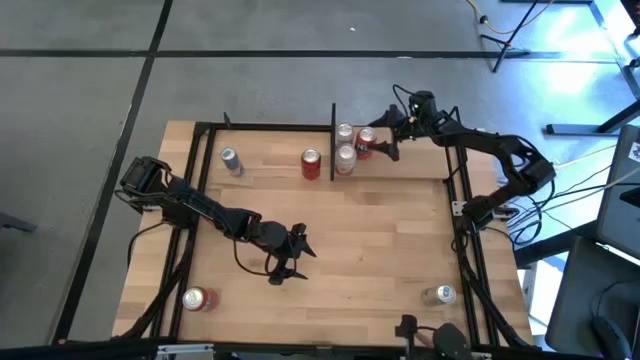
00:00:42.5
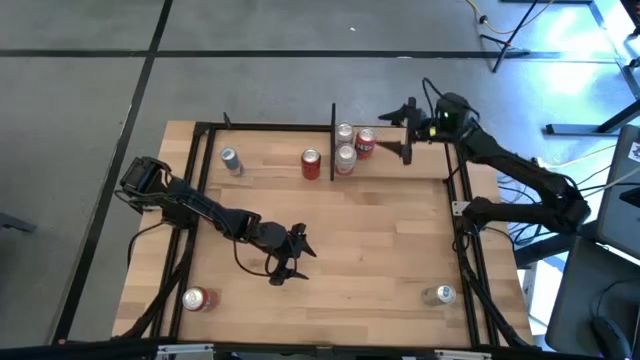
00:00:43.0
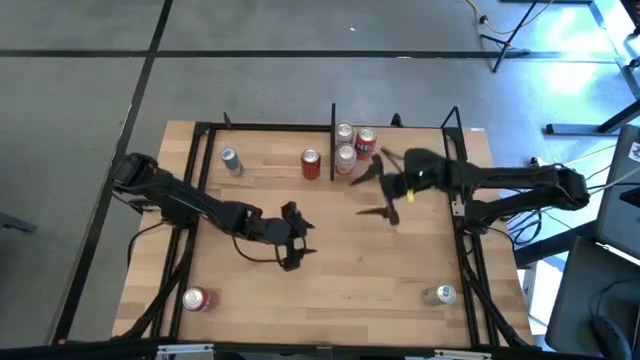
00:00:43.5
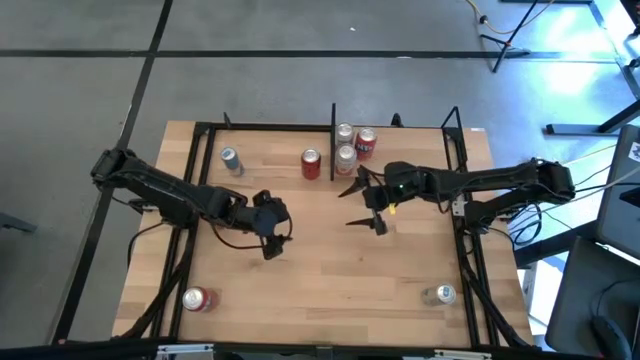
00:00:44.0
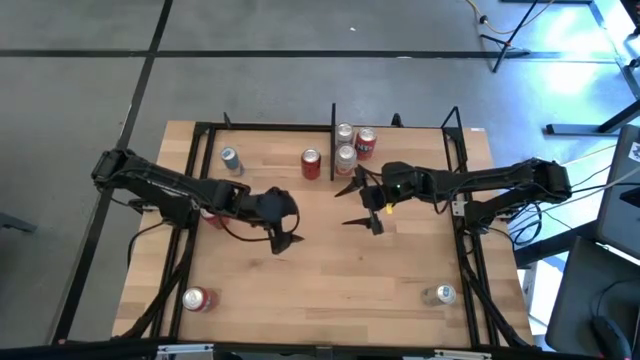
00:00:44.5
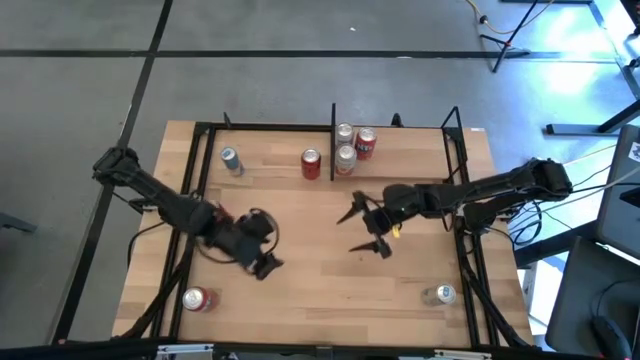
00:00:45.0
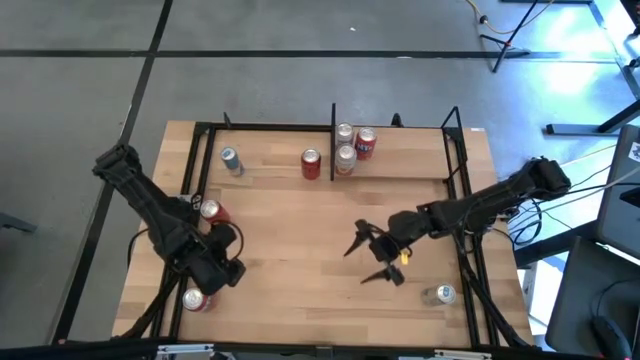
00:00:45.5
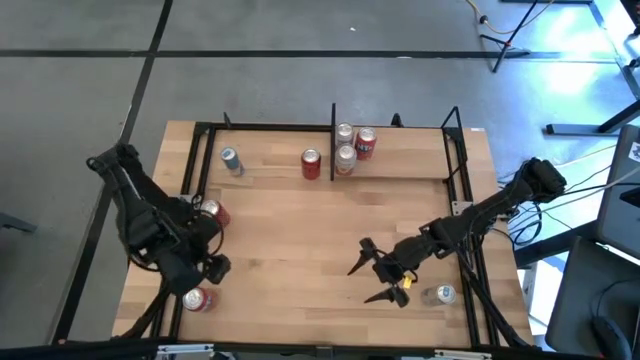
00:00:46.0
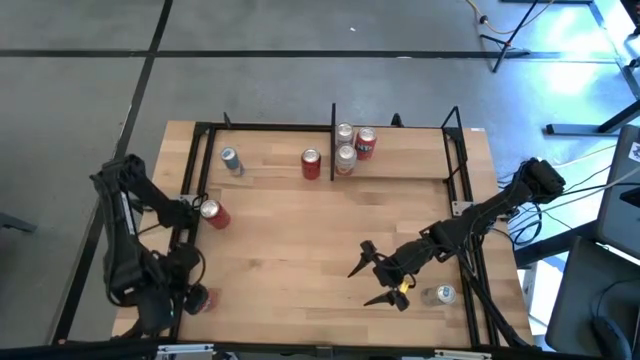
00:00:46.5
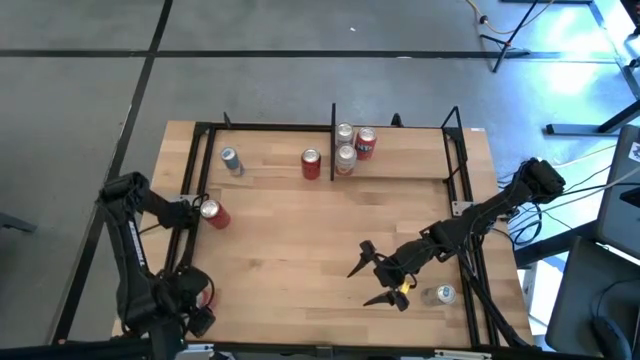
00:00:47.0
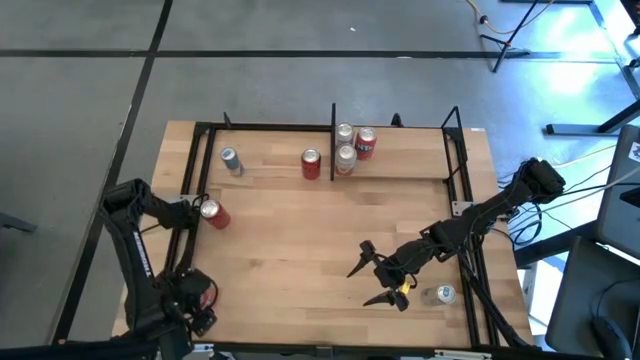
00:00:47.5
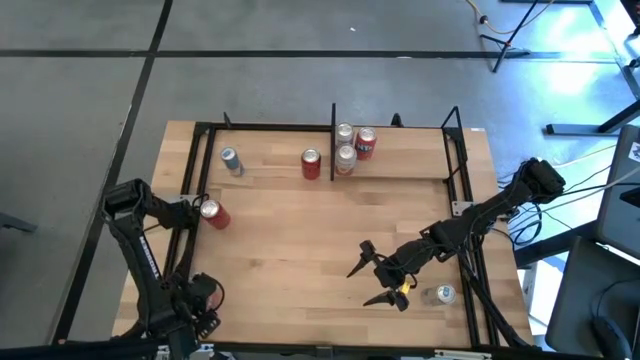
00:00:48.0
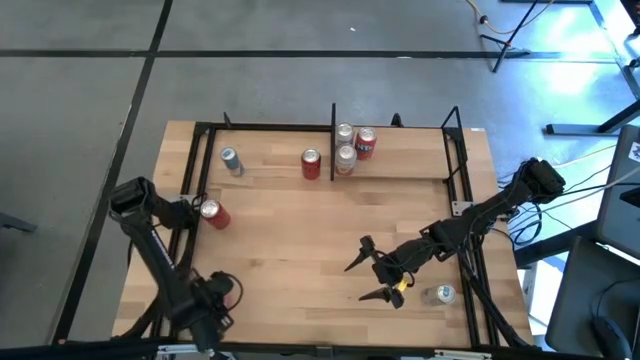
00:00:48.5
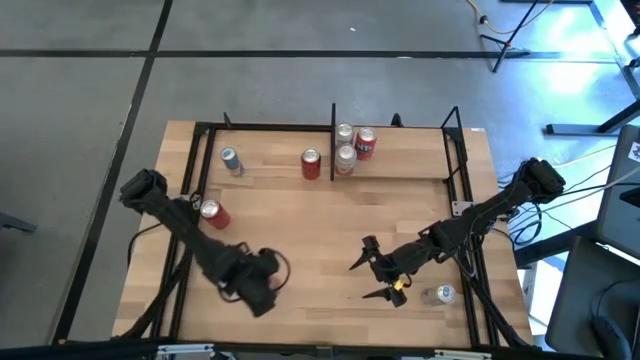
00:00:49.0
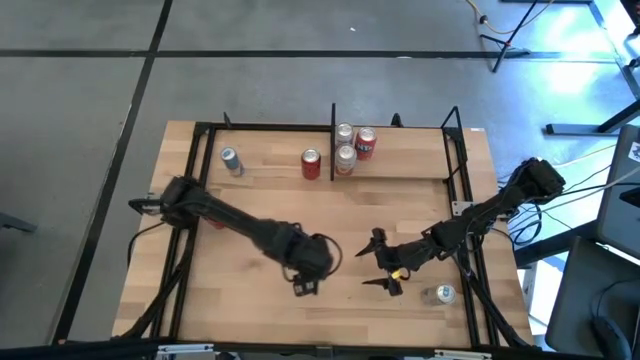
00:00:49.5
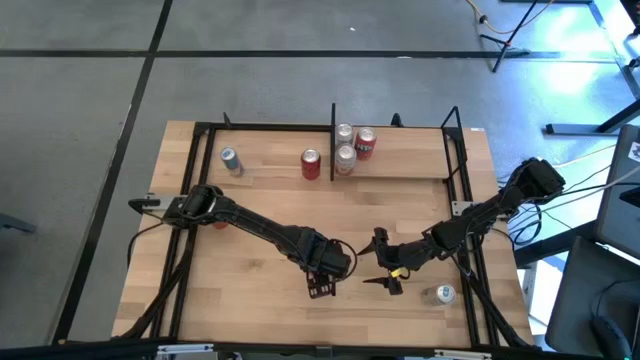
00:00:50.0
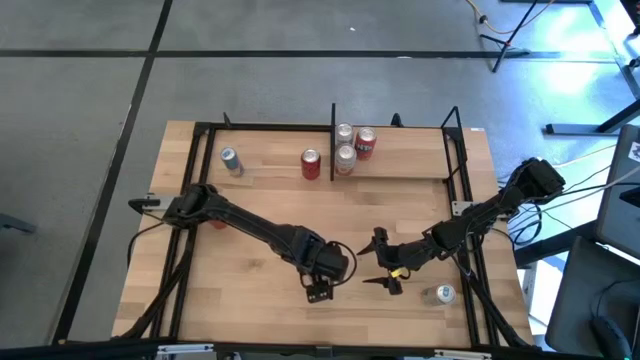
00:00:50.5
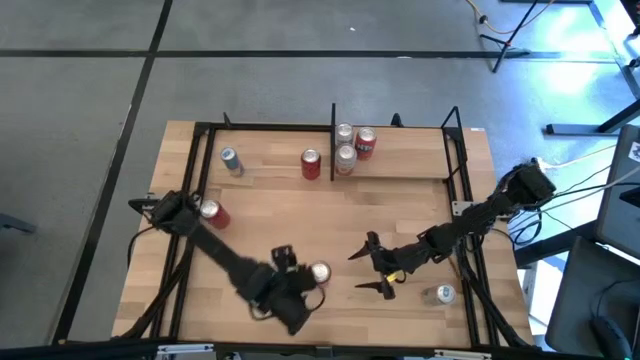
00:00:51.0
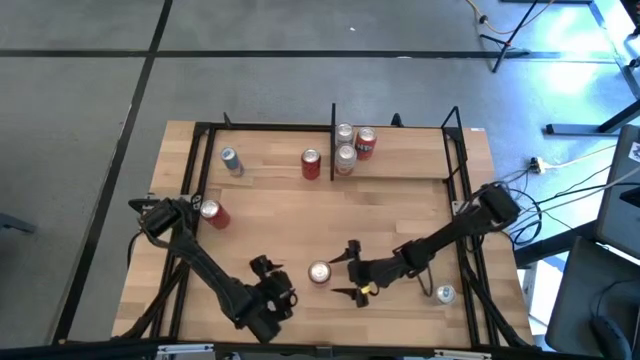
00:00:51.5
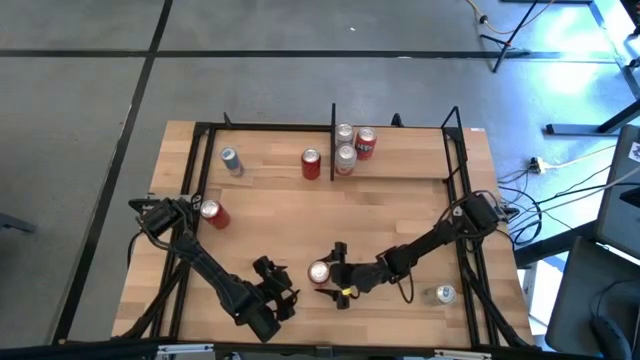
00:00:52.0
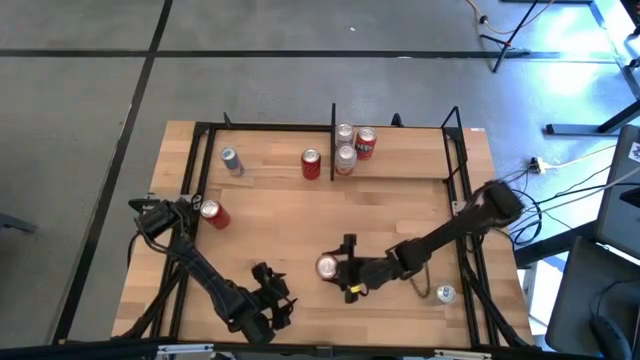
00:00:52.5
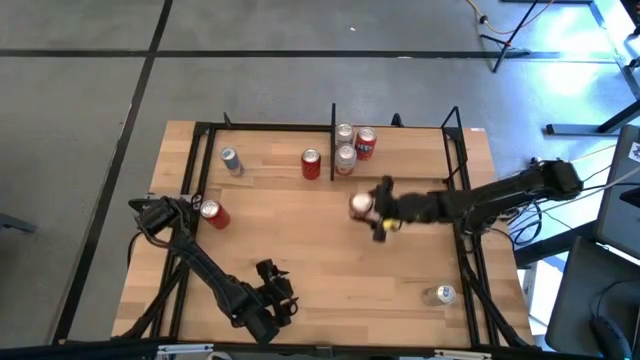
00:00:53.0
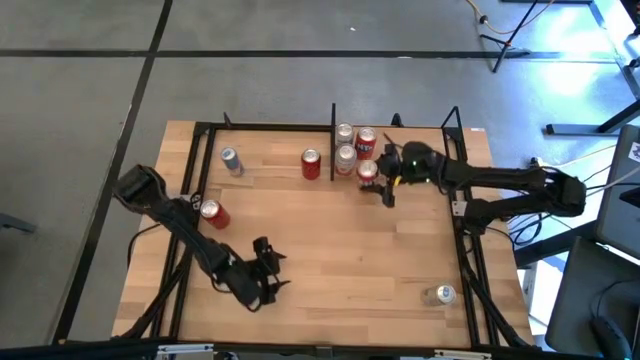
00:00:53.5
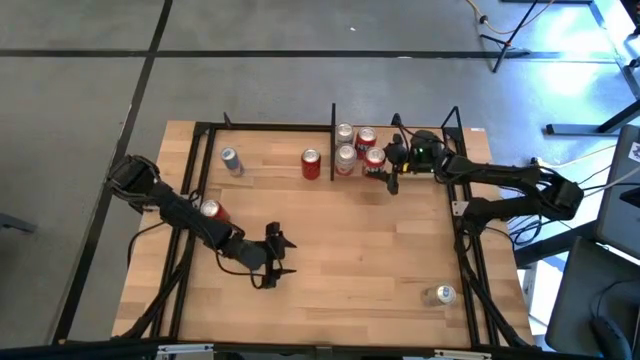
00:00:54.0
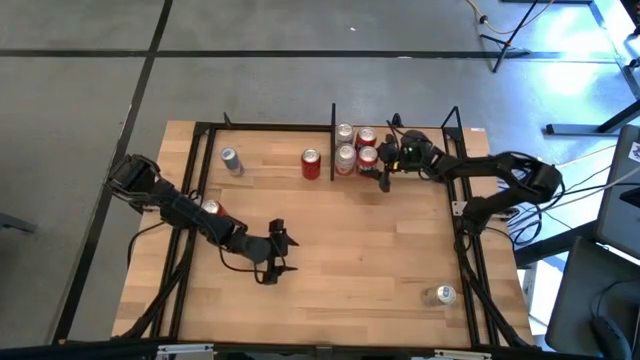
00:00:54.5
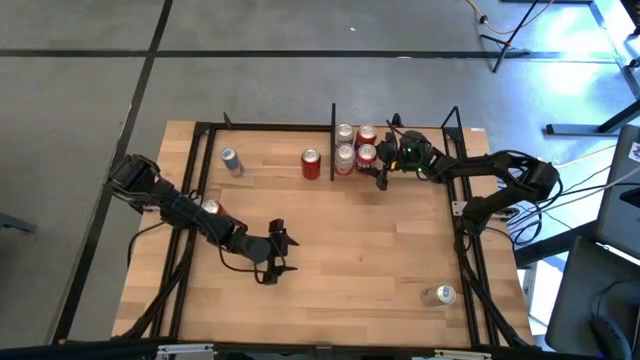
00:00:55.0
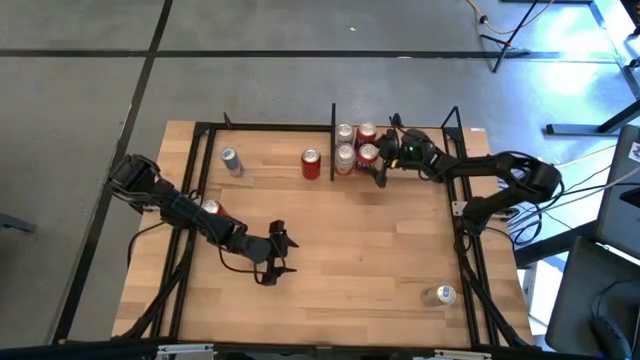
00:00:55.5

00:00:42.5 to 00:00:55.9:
Task: Place canned beverage on shelf
Put the red soda can on the shelf aligned with the other red soda can

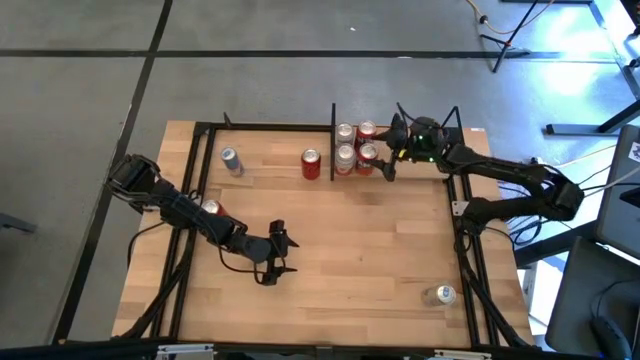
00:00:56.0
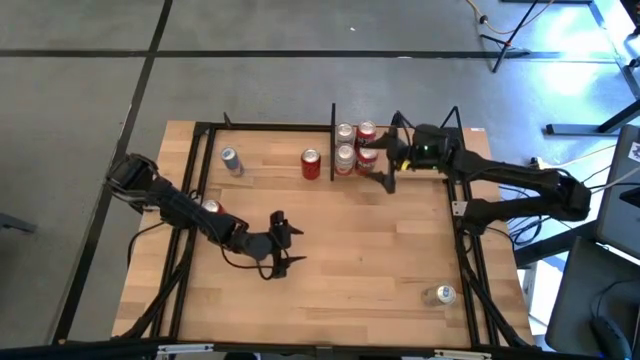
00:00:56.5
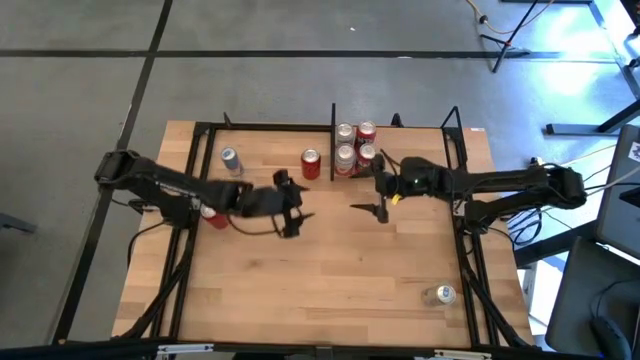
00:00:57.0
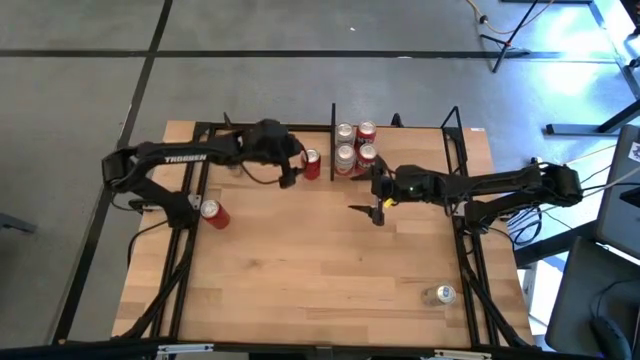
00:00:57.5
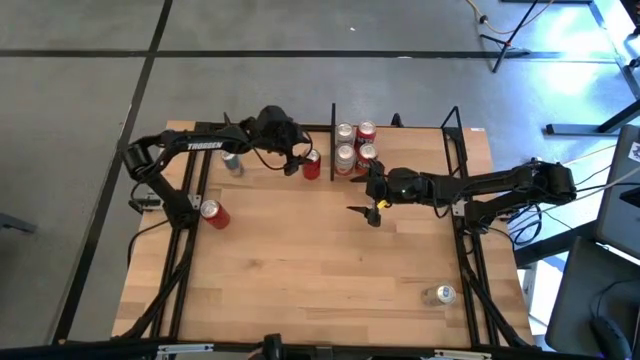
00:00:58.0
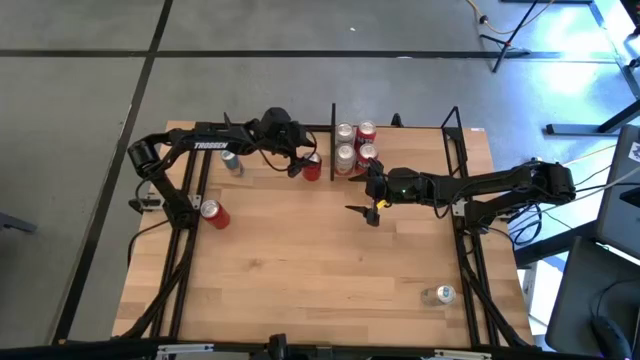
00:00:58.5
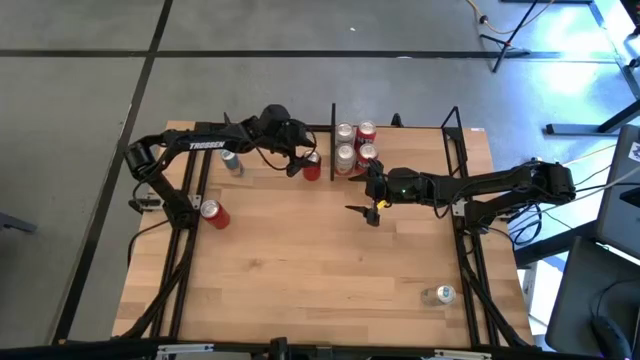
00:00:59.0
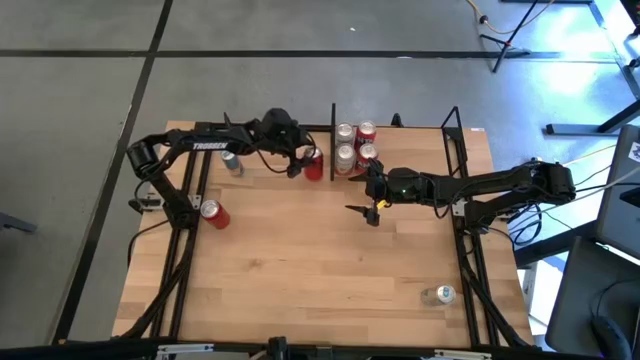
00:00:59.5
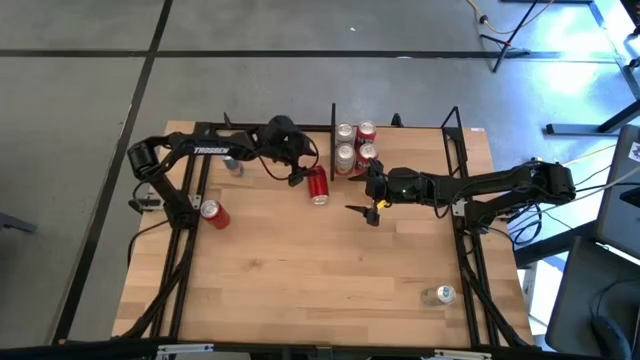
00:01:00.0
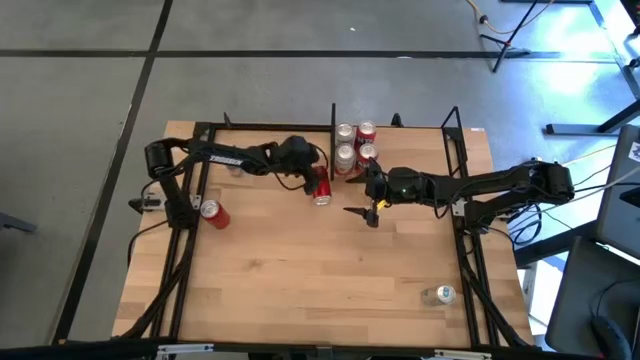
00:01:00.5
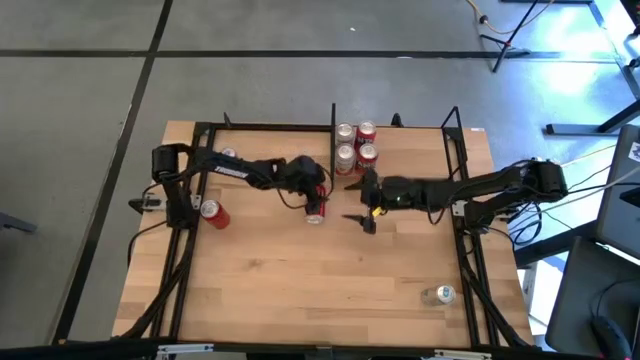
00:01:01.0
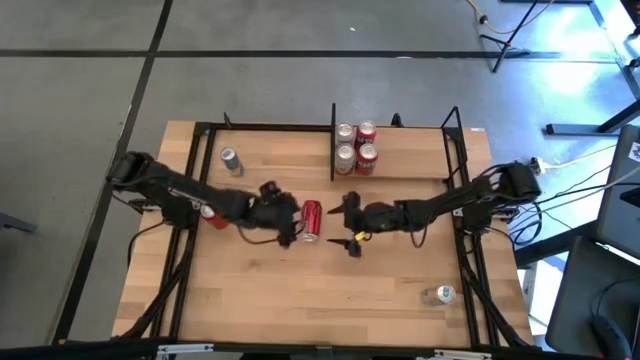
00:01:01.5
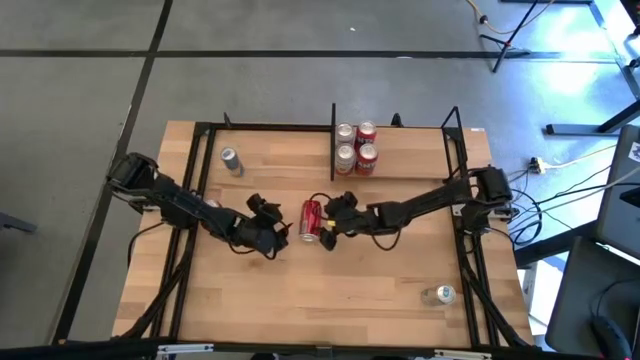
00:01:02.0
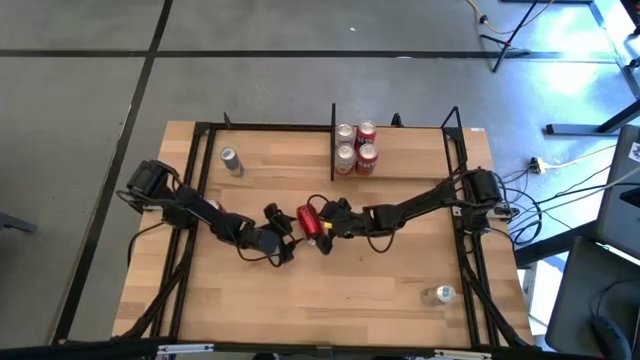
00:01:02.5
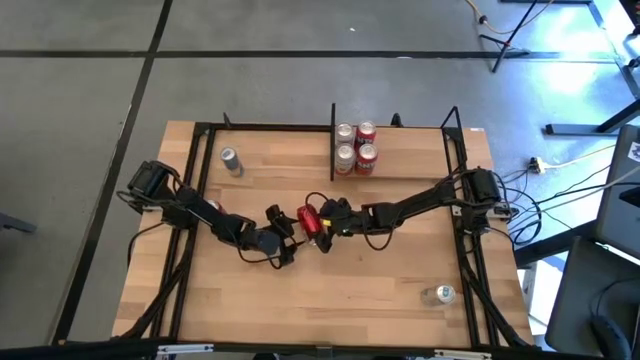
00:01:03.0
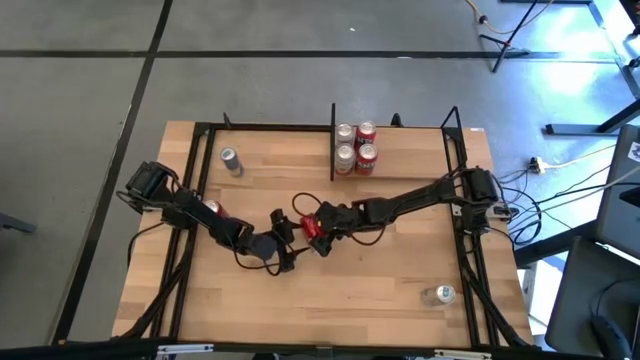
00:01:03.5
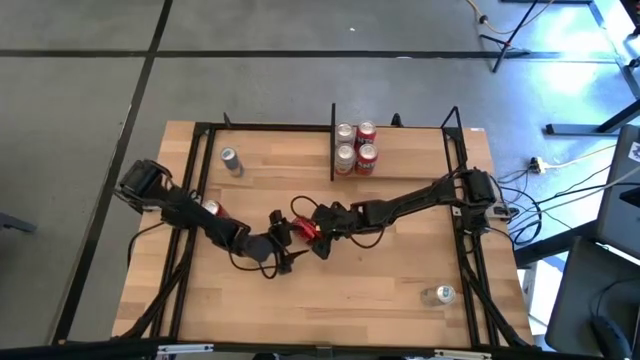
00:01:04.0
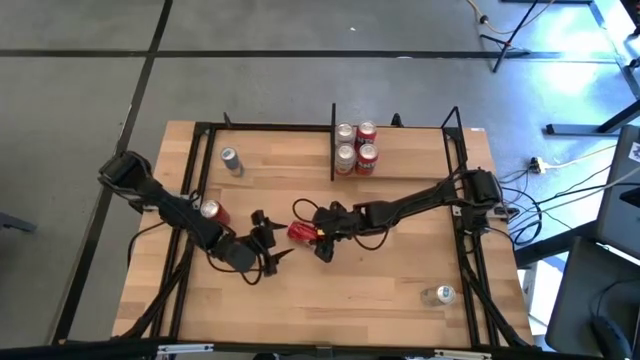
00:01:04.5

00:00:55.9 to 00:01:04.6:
Put the right red black soda can on the shelf
